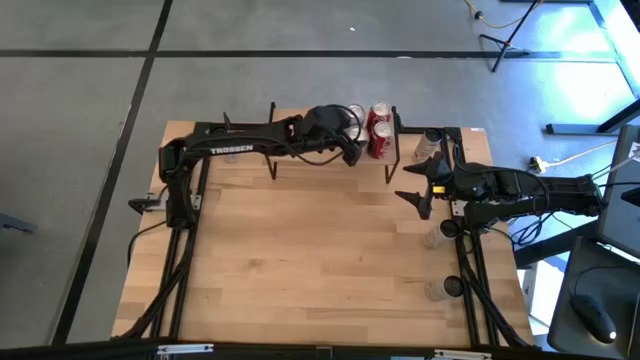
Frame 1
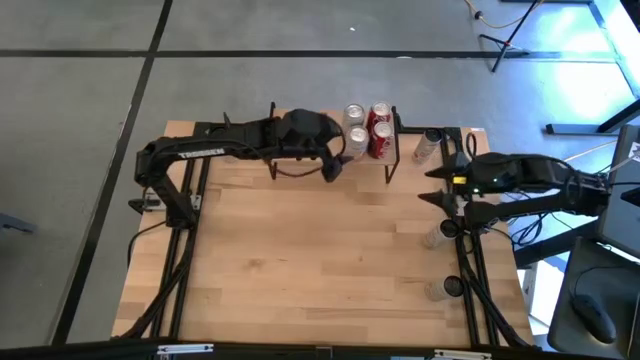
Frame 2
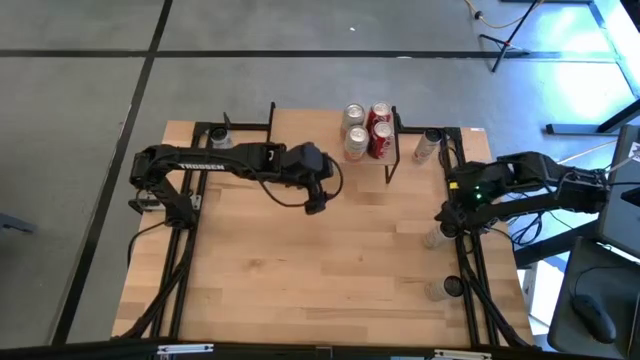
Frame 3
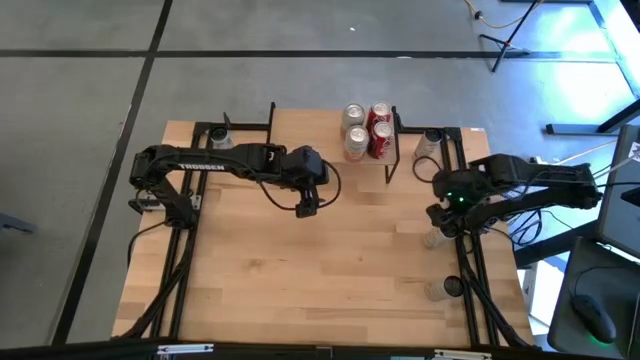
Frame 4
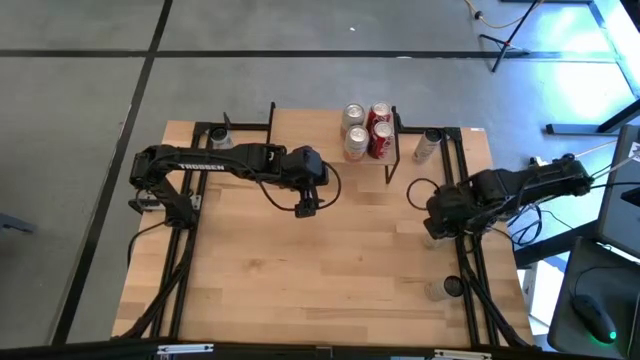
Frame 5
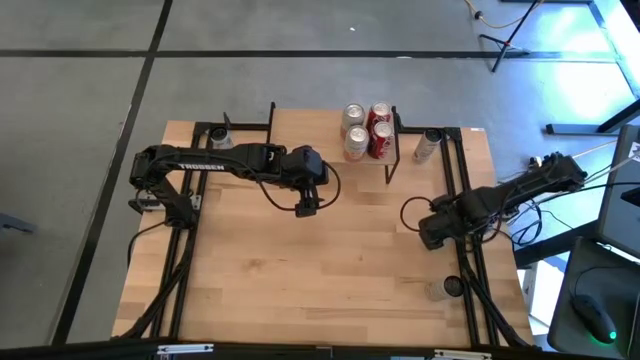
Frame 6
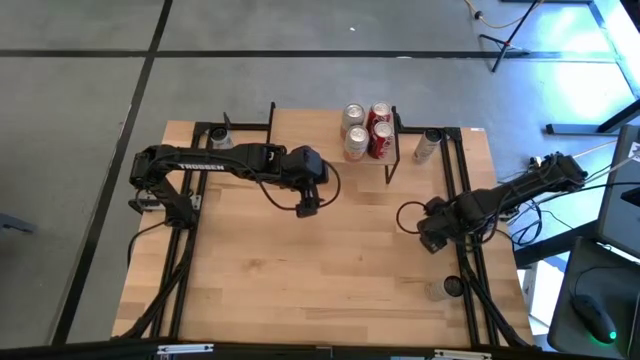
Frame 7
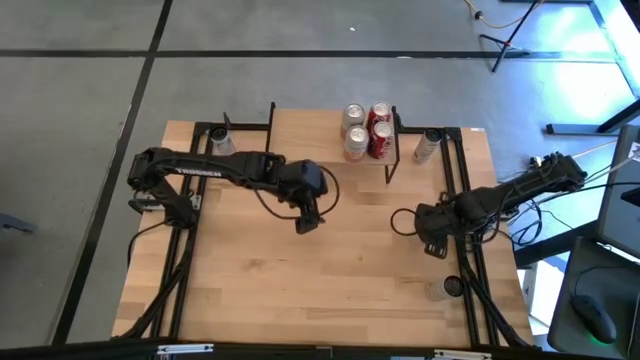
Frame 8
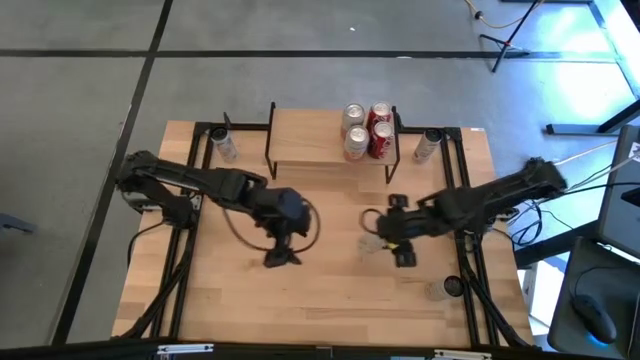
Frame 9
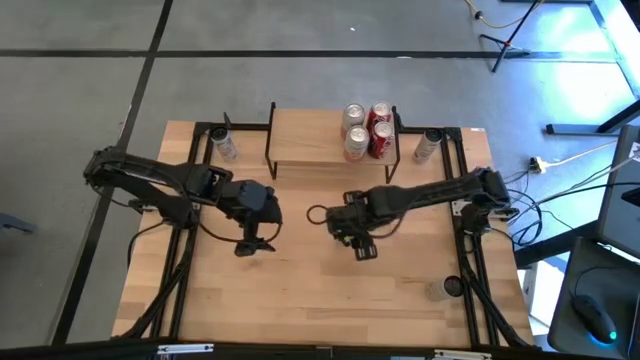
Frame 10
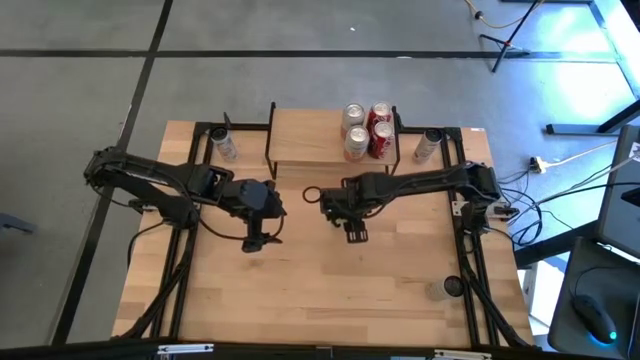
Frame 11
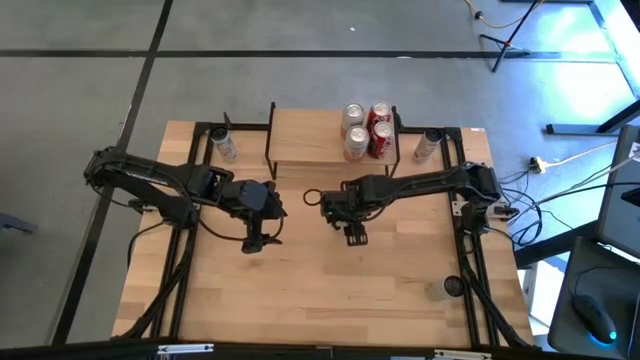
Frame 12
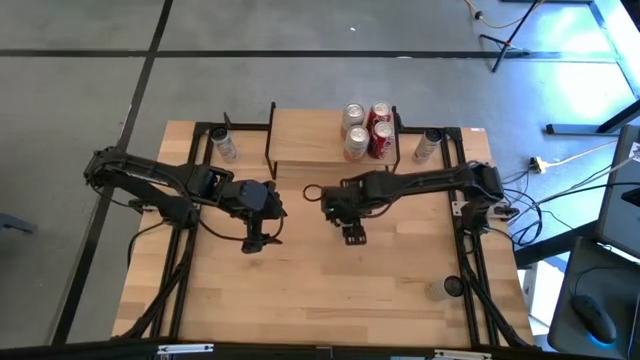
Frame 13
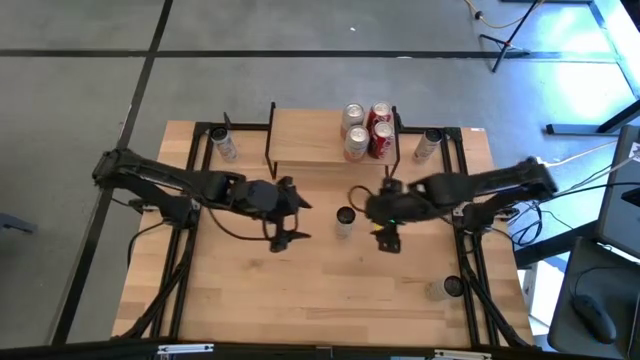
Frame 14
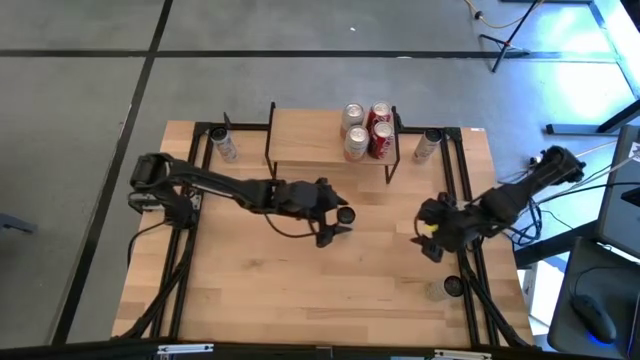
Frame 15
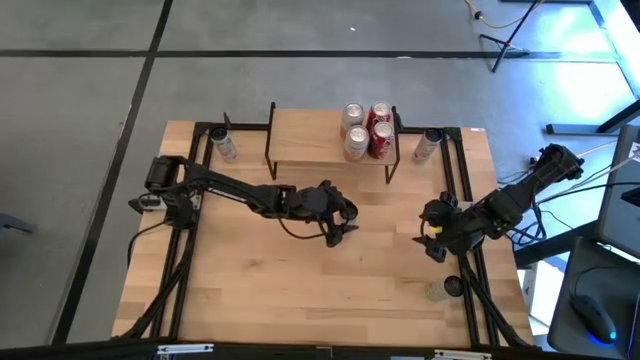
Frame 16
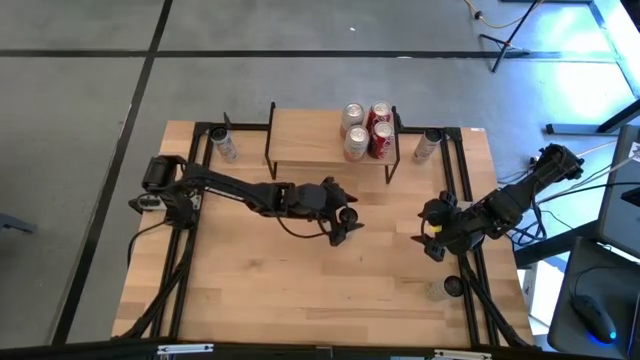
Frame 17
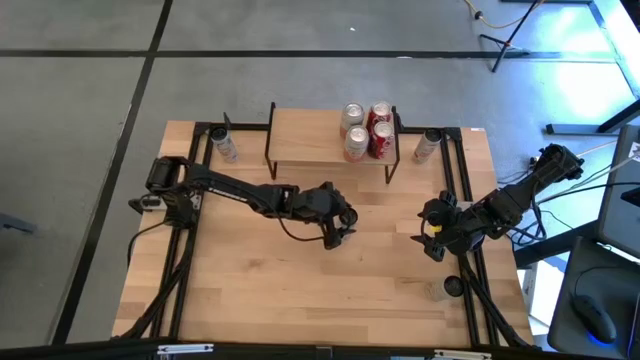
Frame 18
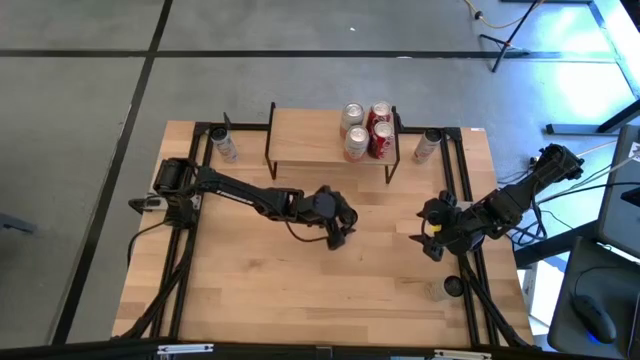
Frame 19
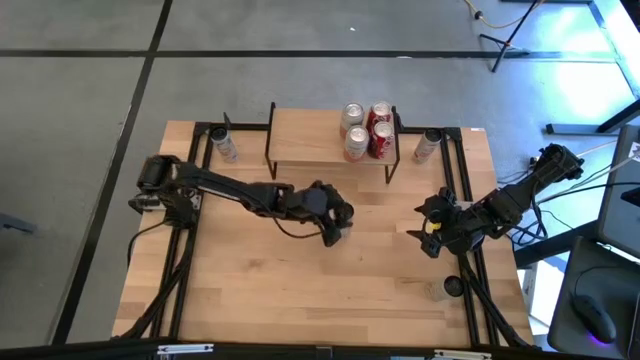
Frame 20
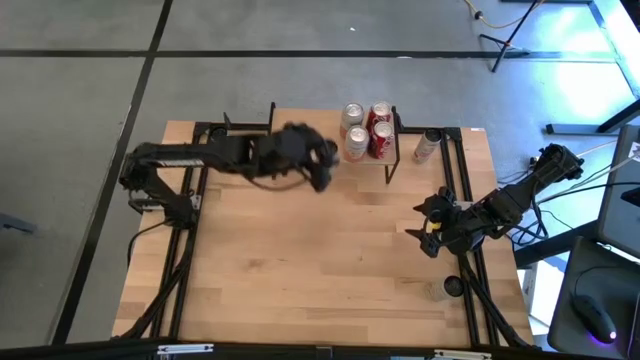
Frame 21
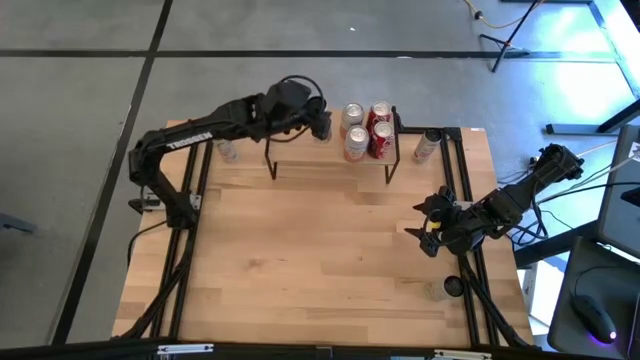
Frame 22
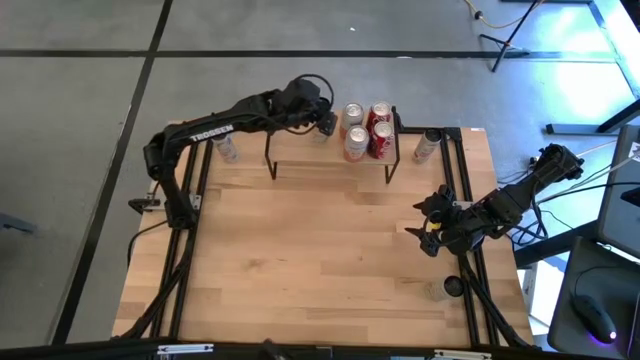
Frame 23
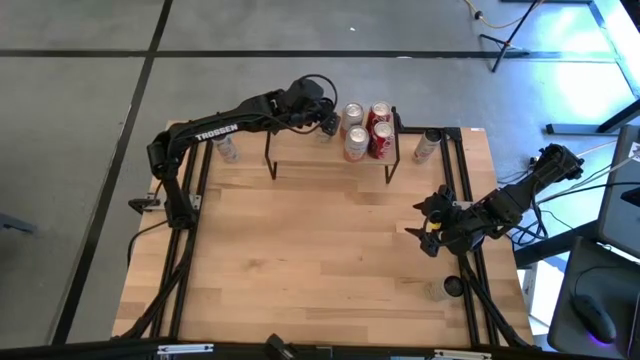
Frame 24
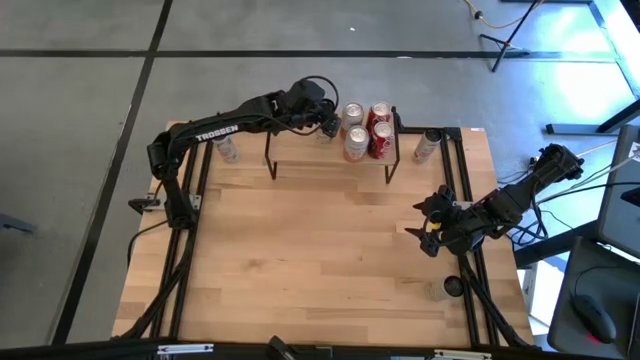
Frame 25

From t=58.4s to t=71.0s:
Task: Place canned beverage on shelf
Put the top white yellow soda can on the shelf

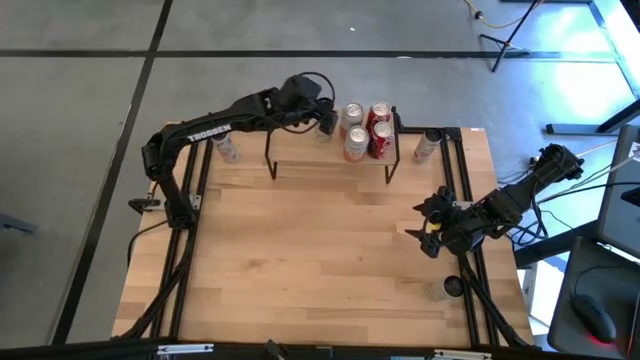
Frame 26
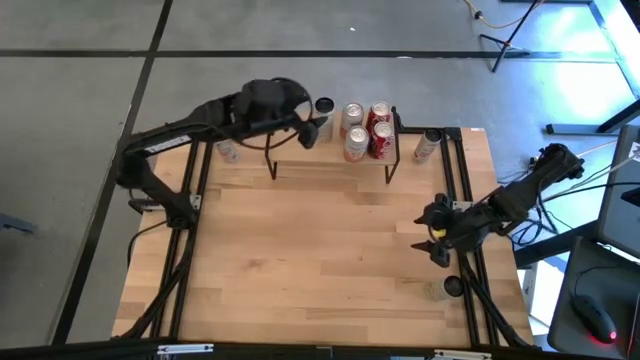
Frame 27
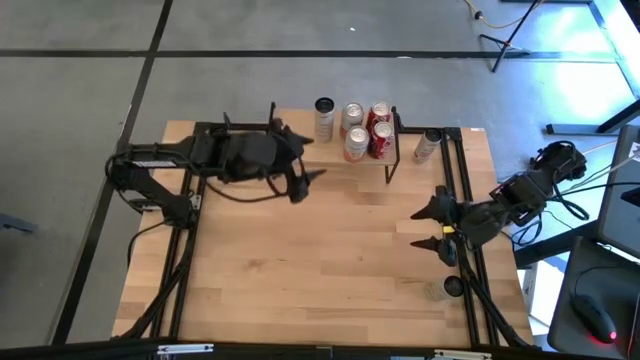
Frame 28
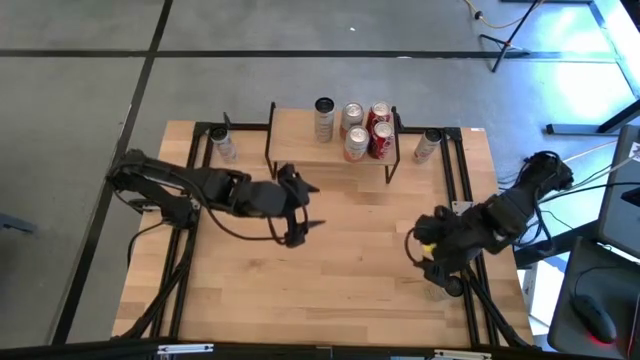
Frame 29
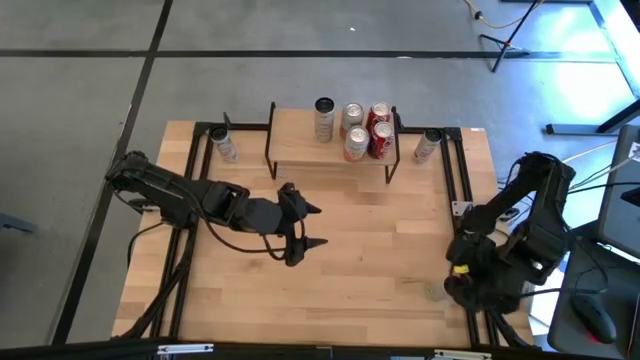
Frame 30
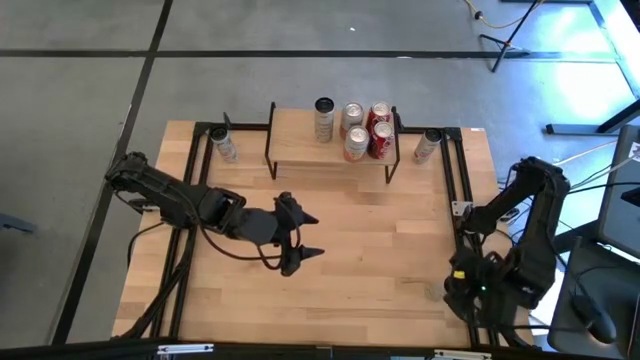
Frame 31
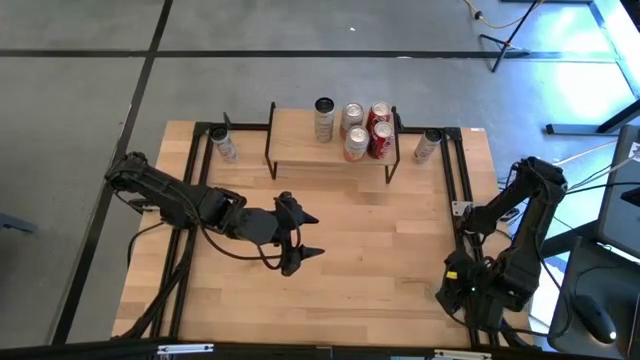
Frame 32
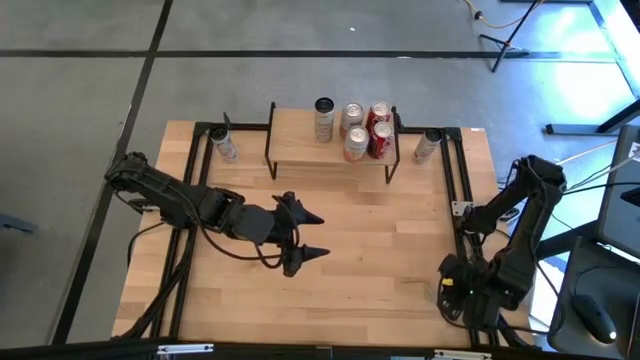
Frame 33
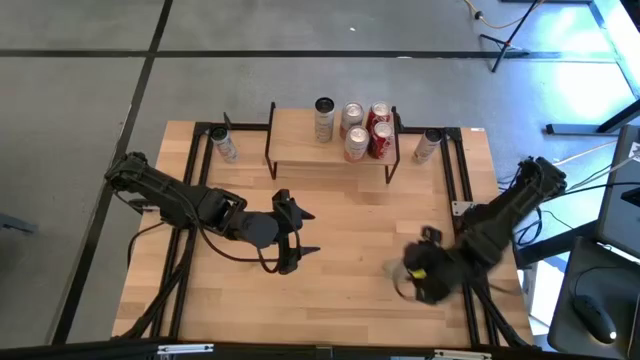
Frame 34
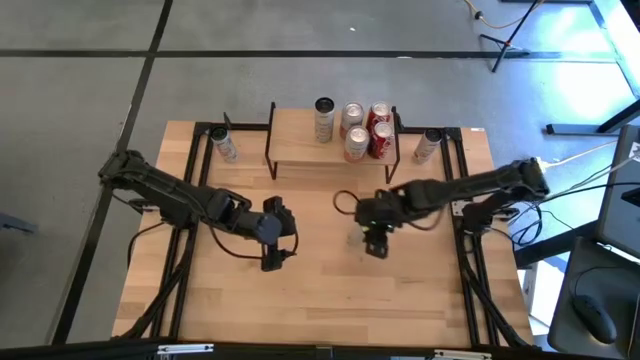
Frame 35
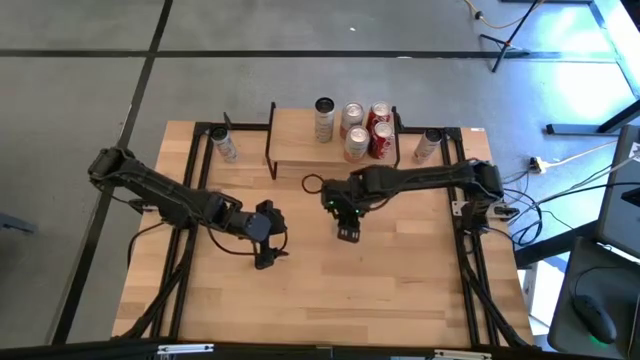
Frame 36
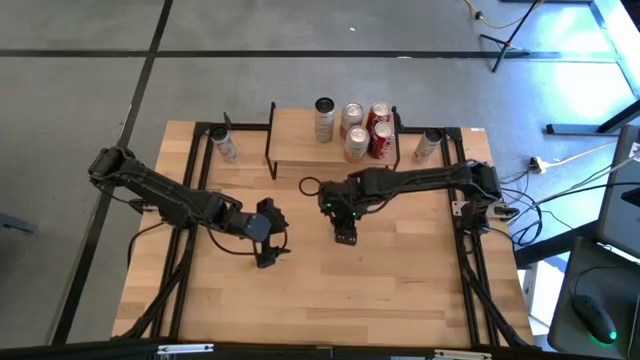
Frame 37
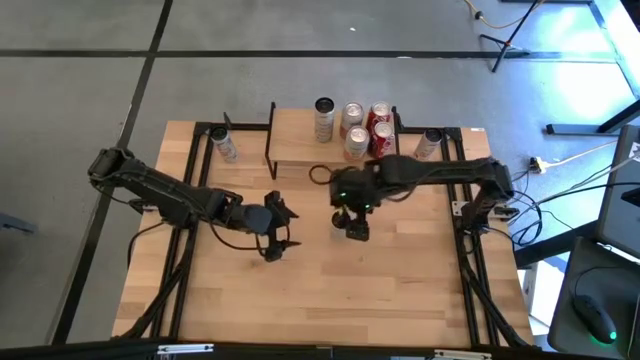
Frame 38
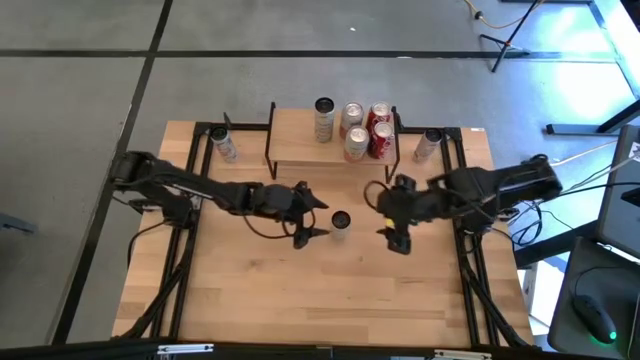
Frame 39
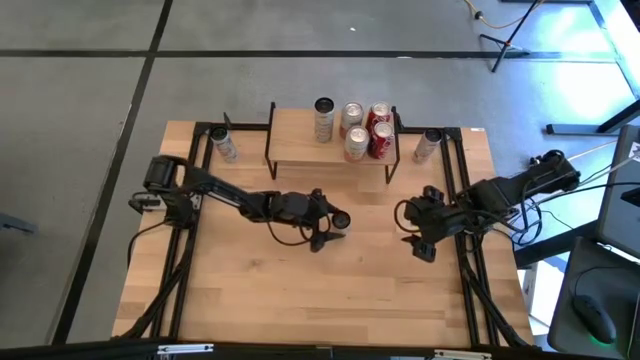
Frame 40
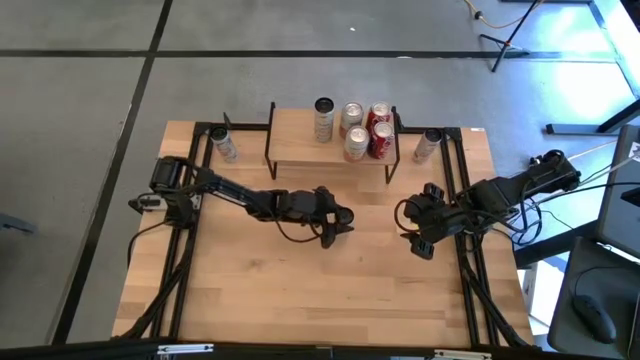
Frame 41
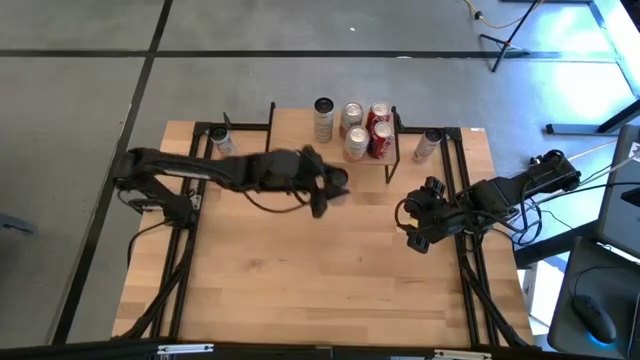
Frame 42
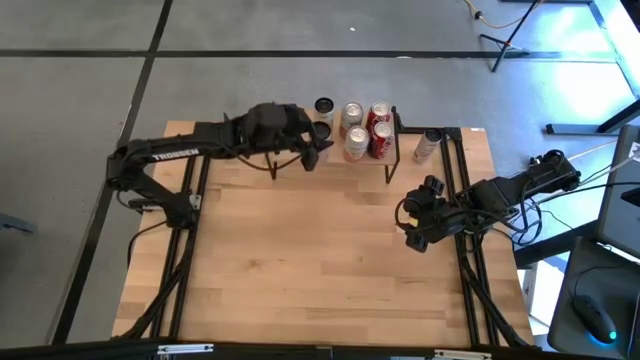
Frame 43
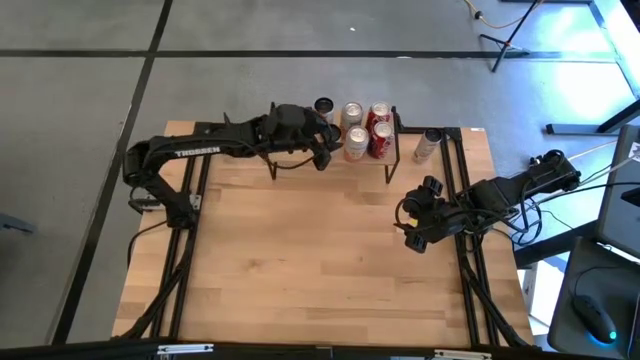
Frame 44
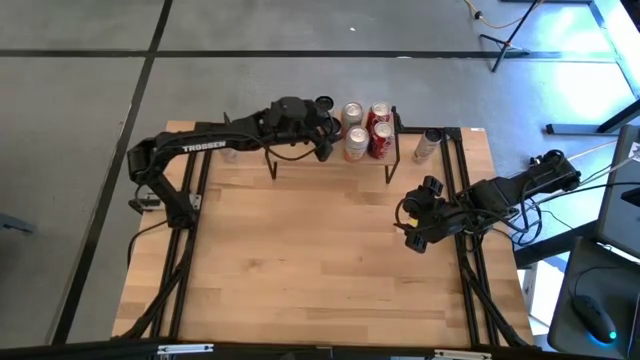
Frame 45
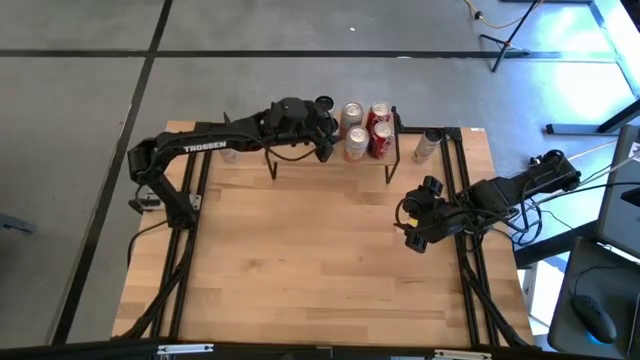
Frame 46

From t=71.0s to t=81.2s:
Put the white yellow soda can on the shelf aligned with the other white yellow soda can
